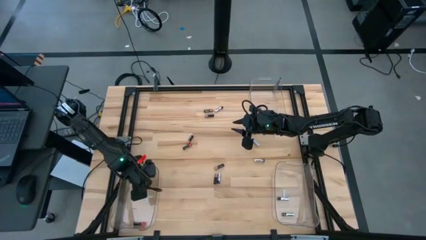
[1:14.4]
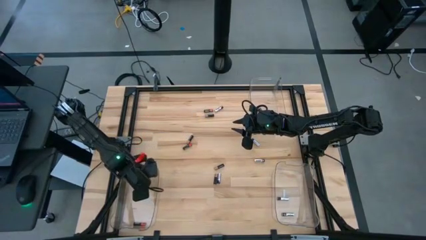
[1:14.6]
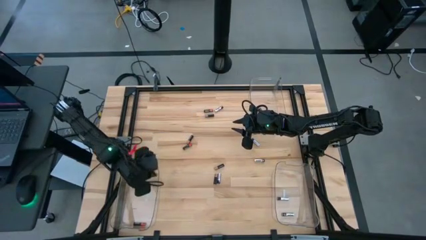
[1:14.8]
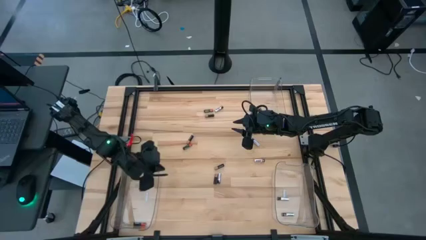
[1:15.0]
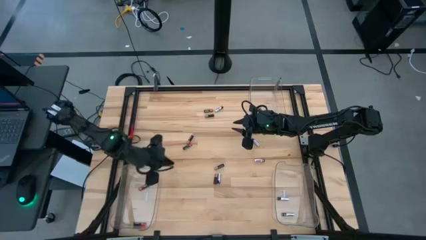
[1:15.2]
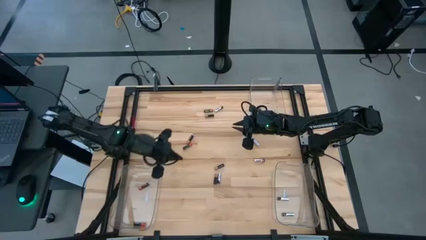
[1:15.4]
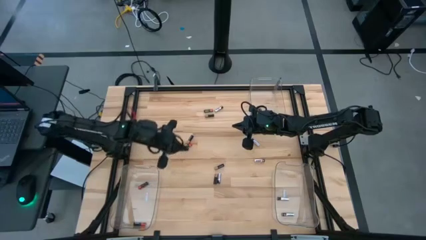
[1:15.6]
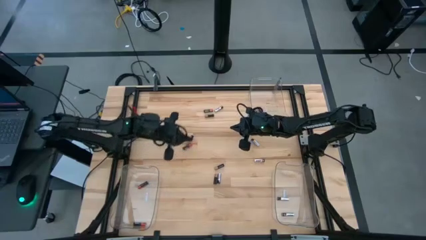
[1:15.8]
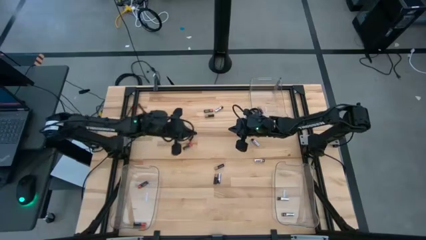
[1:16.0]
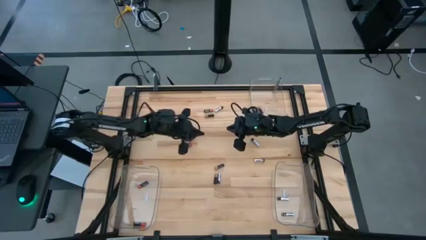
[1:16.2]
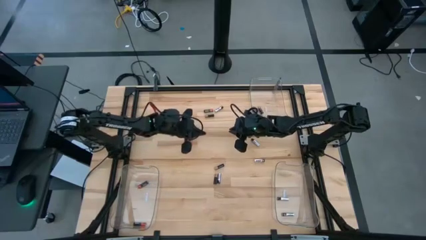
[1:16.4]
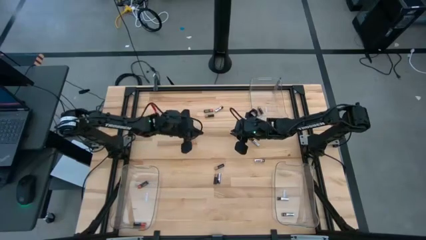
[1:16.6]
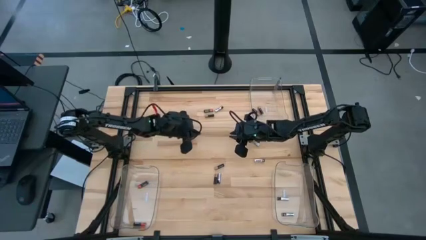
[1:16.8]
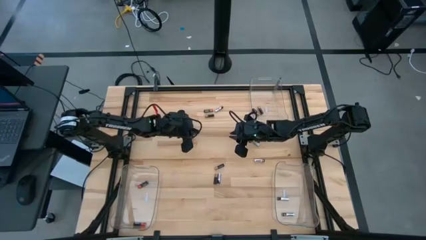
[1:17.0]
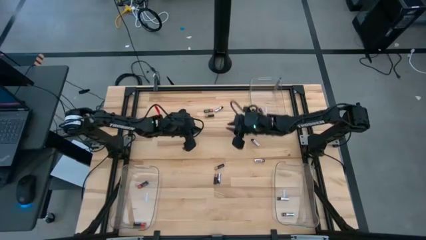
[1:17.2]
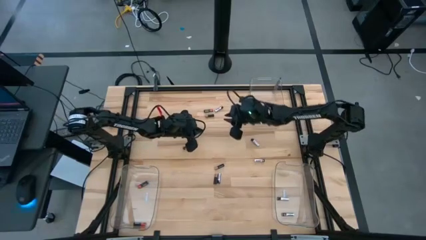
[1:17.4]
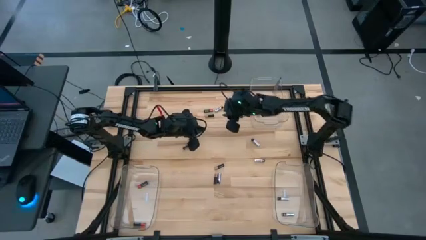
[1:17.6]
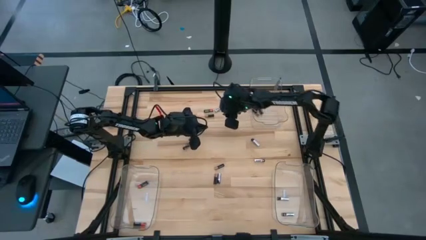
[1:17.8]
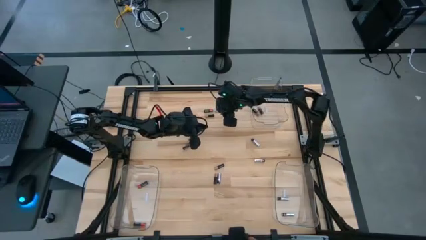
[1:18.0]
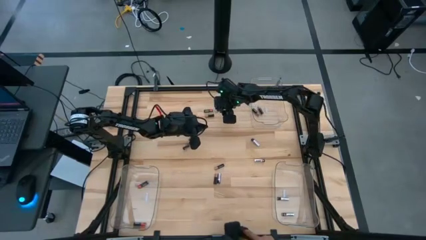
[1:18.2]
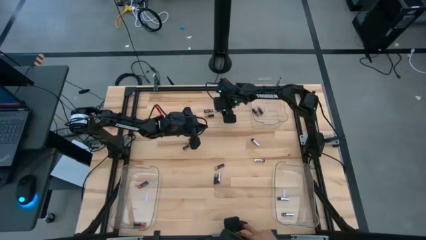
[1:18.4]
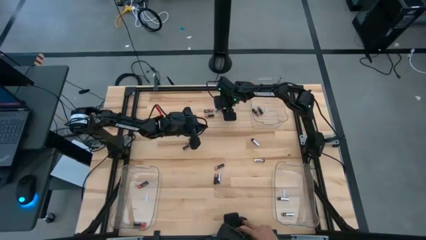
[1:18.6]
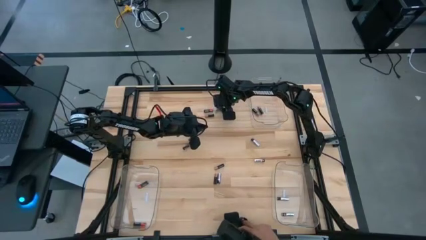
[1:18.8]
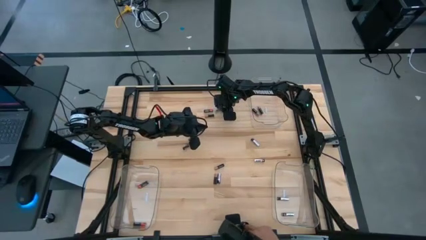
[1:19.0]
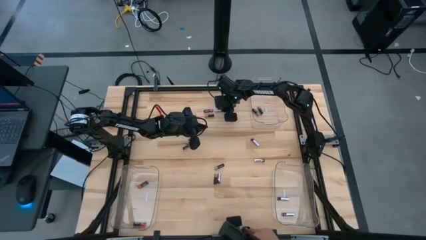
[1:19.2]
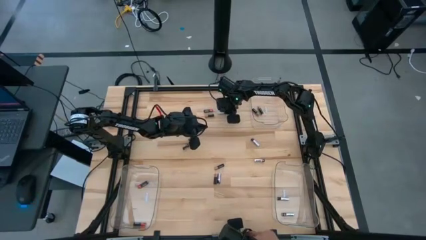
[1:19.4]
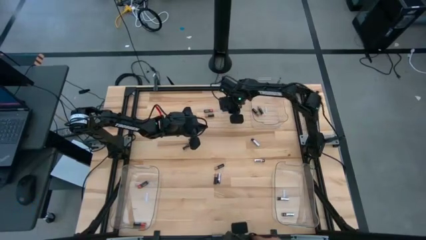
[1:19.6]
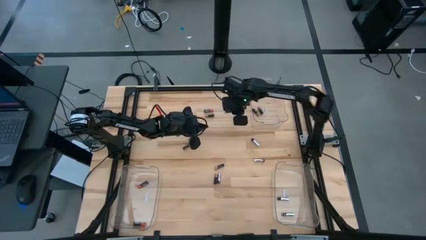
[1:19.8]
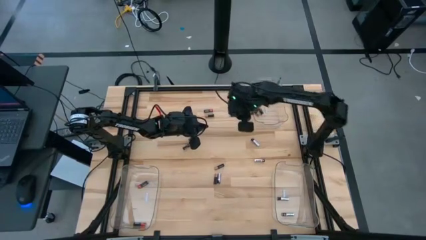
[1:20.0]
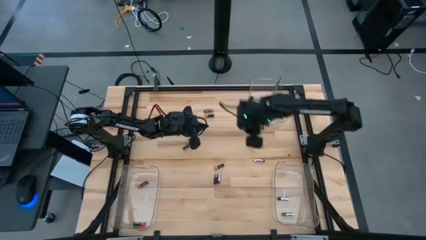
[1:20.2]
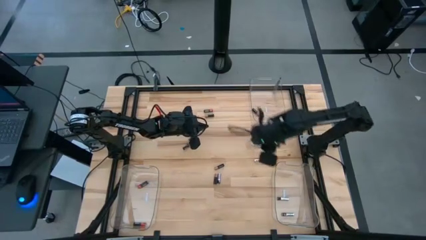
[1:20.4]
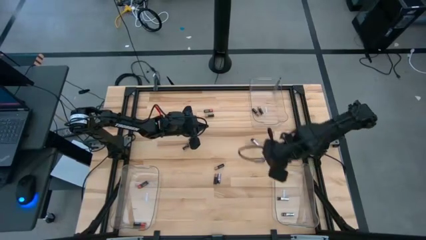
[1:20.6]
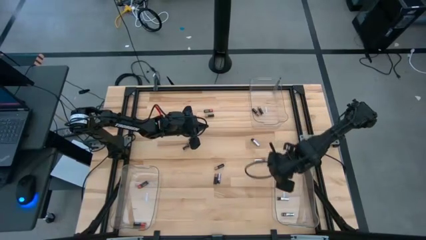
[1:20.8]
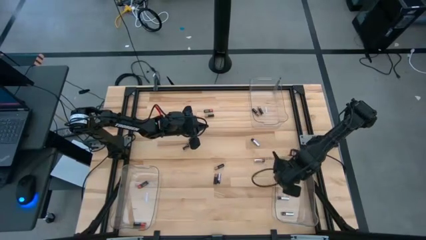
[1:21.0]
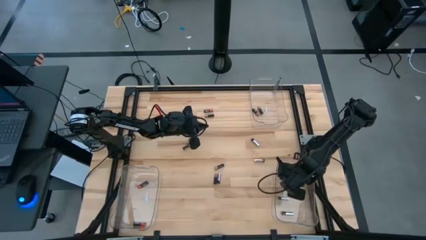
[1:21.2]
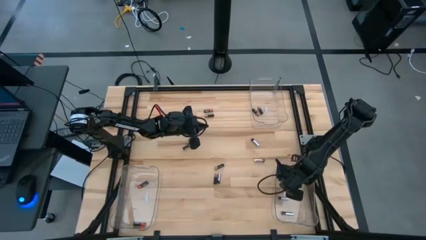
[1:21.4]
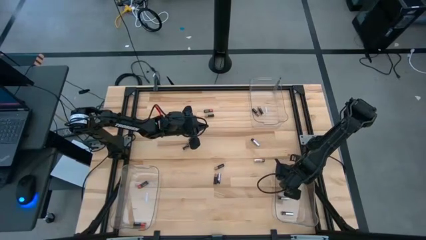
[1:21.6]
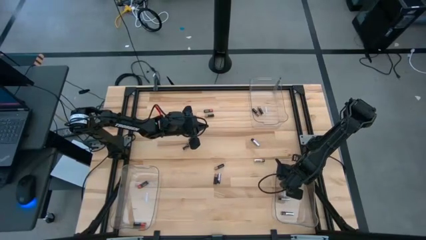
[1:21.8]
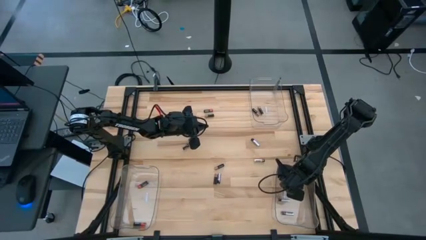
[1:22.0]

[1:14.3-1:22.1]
Task: Sort batteries
Put the white battery into the bottom right transparent bin

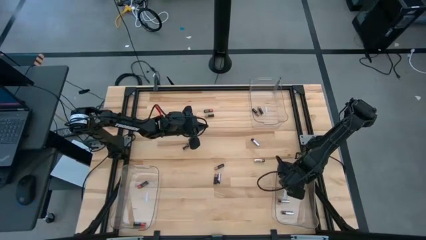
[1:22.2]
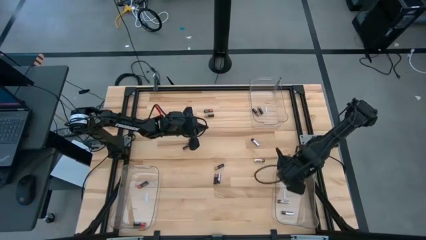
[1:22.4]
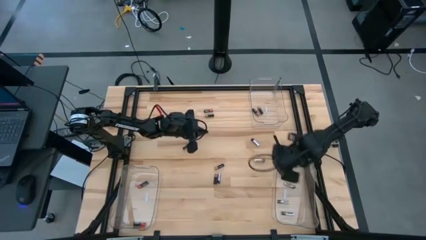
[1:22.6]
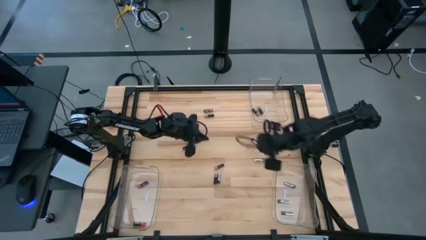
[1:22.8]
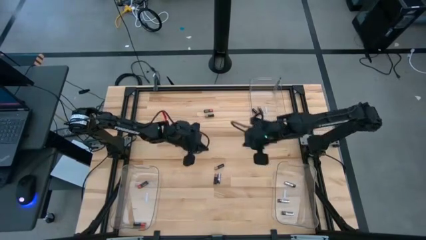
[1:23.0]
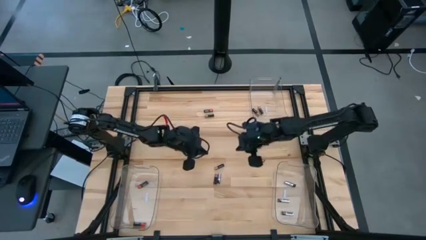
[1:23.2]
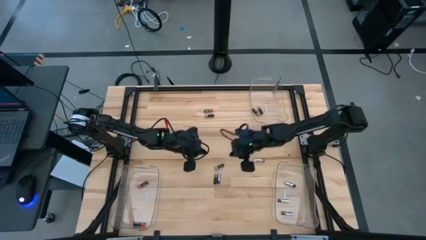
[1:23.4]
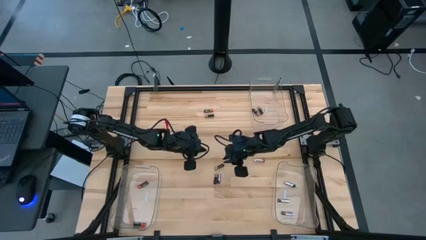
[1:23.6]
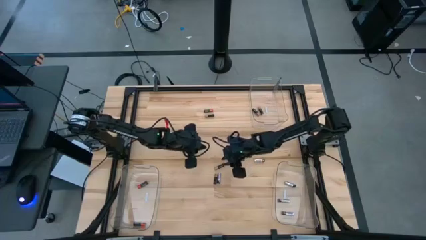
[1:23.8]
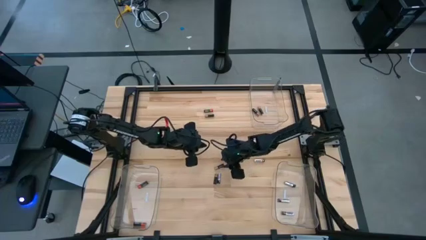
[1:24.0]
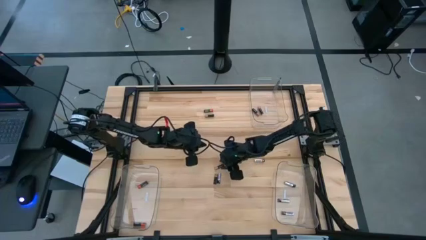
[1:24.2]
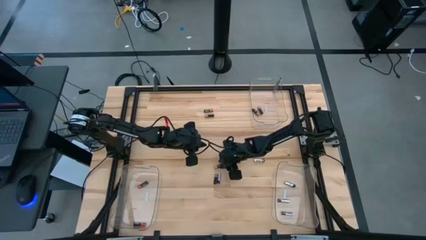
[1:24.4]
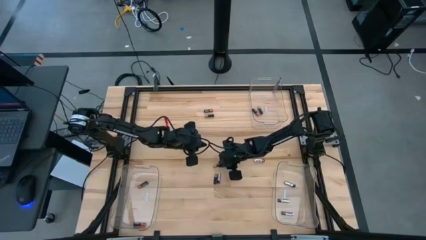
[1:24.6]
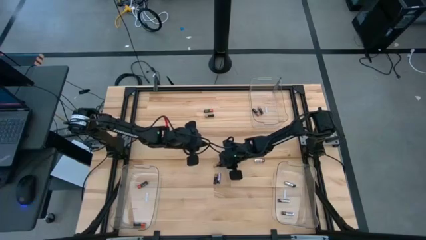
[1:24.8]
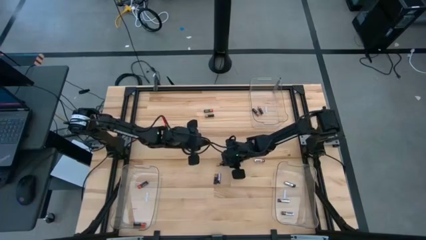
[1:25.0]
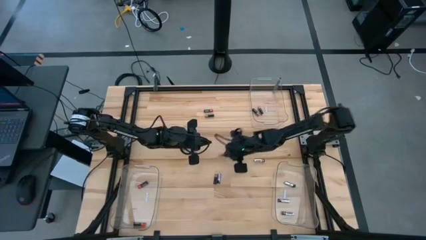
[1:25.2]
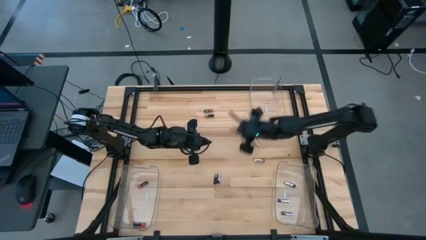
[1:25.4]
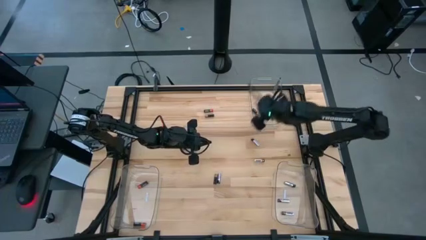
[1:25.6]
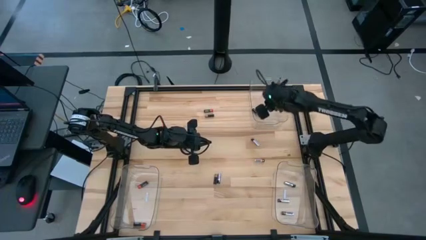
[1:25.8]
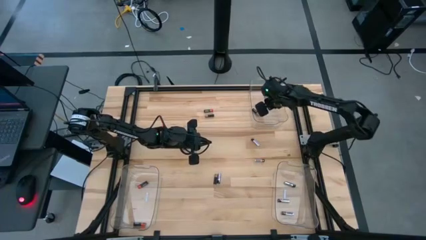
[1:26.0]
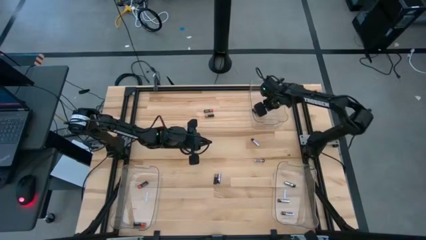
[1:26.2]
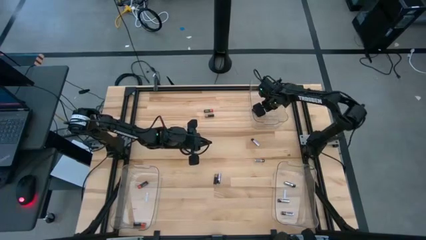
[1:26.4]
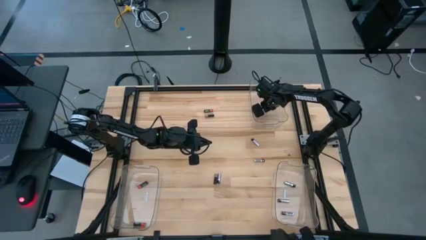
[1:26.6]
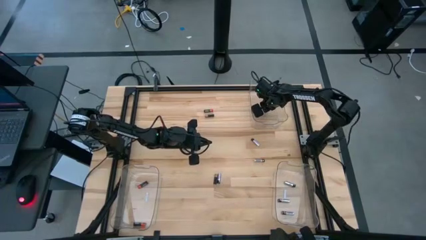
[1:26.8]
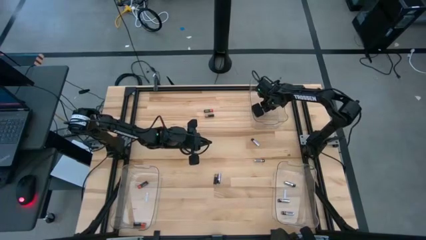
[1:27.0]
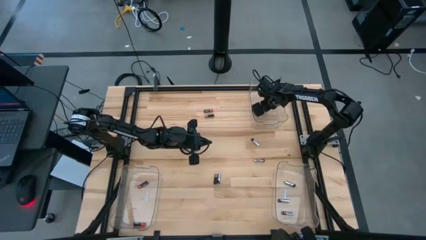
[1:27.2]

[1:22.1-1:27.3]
Put the brown battery into the top transparent bin

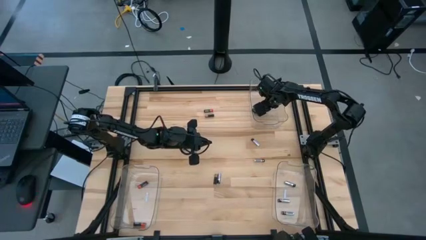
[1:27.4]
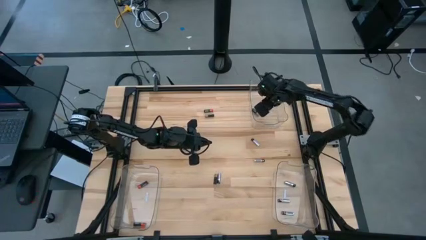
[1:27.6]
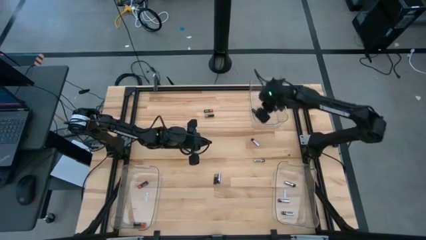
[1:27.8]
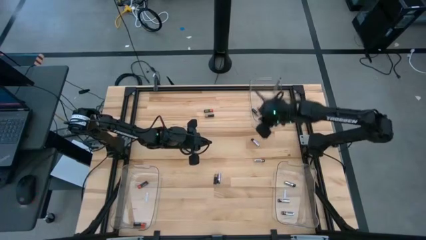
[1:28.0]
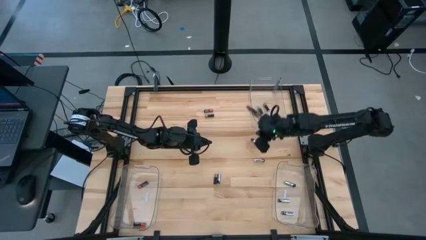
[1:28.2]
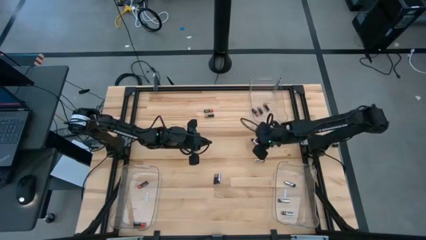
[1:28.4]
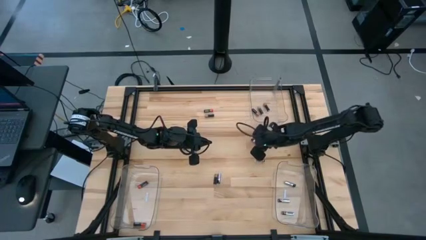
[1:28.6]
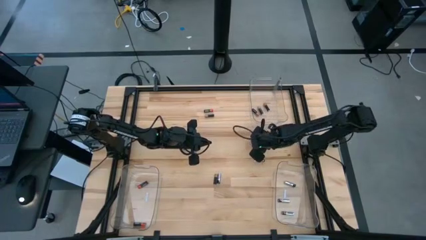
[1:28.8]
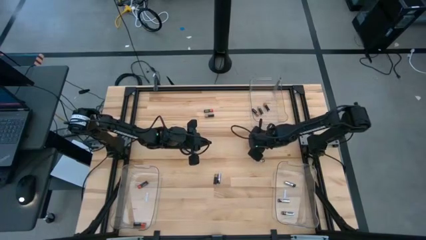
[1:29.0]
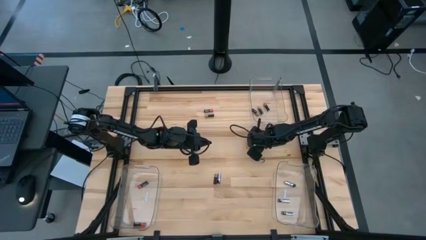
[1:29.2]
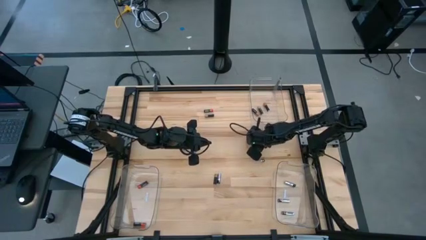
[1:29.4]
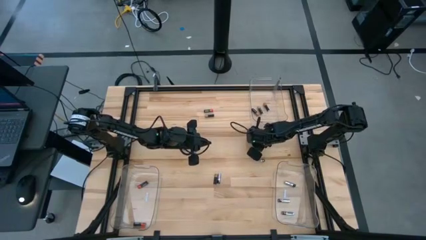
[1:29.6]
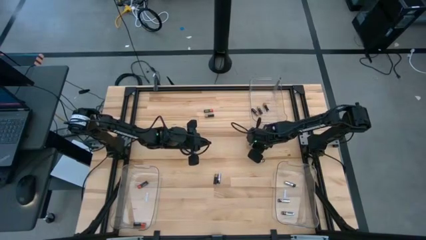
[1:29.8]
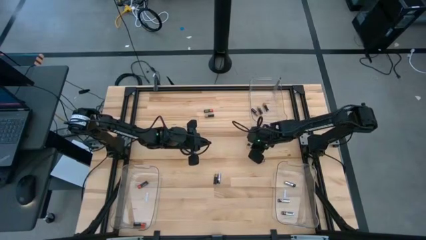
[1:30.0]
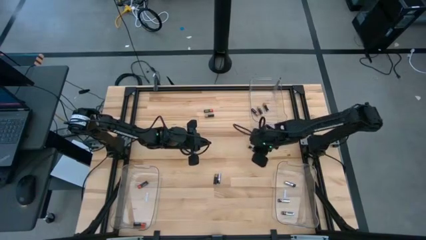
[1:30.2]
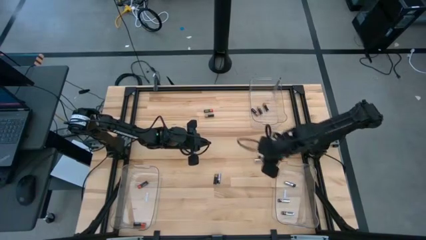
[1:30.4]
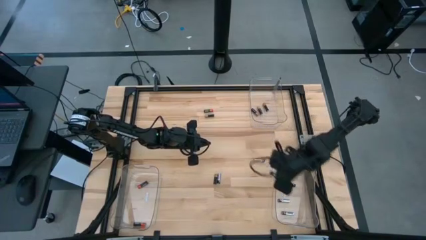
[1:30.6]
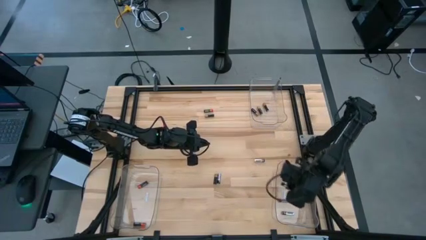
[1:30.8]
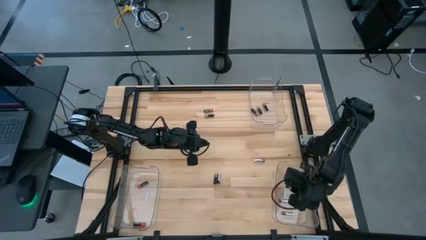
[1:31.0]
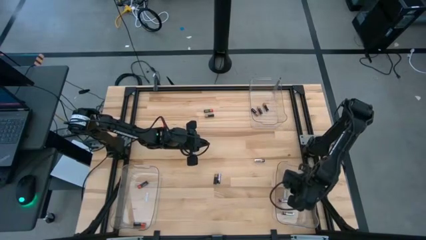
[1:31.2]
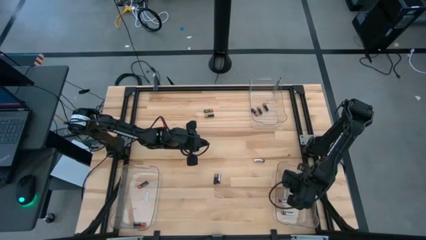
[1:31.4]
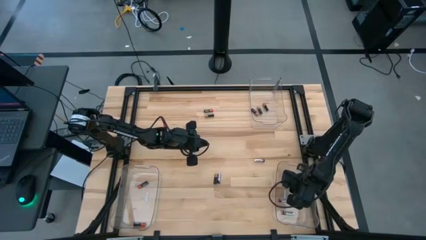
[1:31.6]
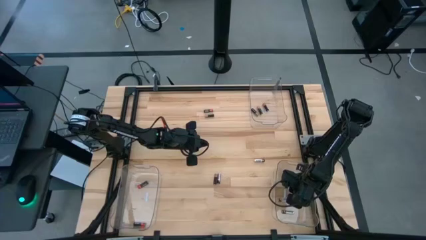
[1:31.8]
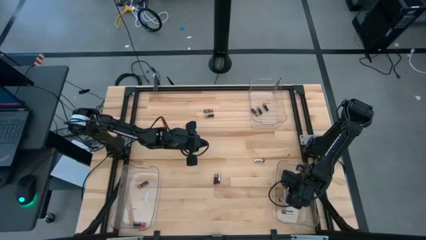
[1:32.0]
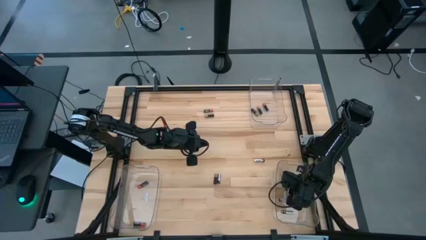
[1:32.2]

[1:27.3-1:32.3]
Put the white battery into the bottom right transparent bin
